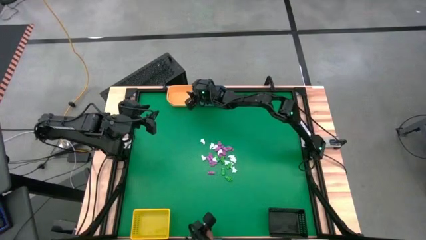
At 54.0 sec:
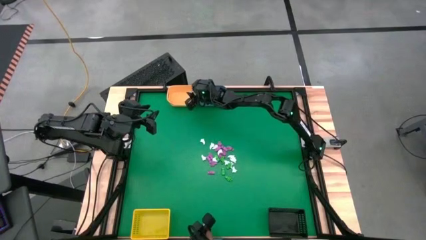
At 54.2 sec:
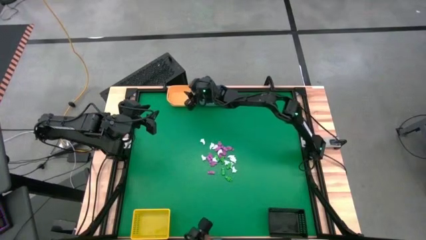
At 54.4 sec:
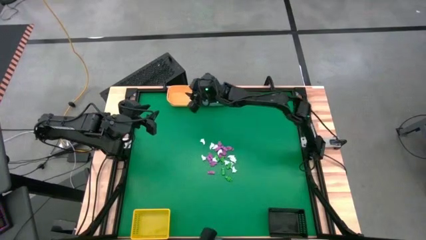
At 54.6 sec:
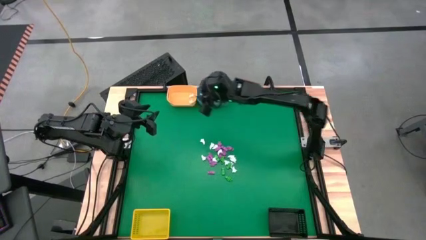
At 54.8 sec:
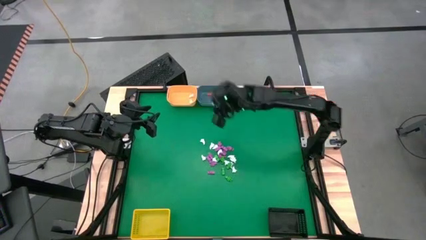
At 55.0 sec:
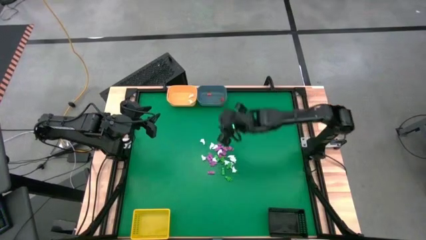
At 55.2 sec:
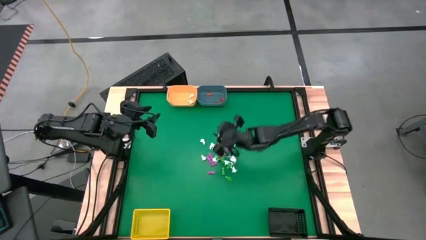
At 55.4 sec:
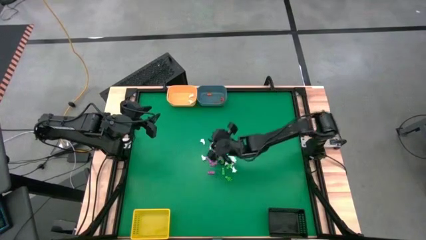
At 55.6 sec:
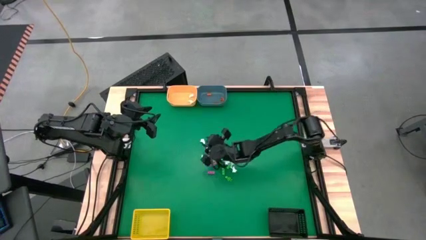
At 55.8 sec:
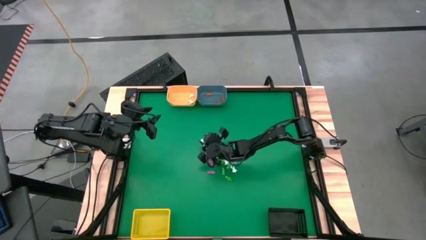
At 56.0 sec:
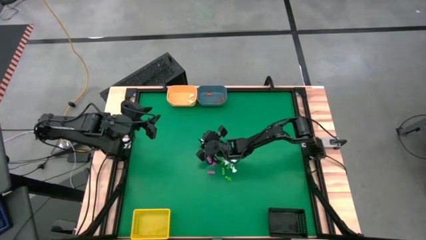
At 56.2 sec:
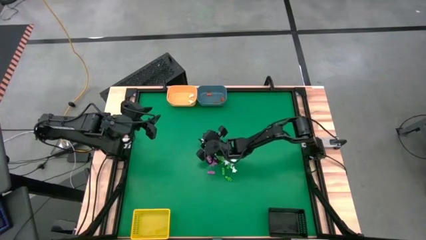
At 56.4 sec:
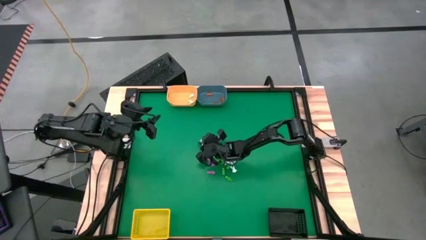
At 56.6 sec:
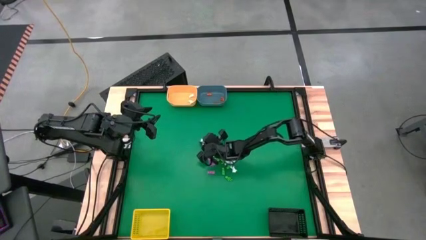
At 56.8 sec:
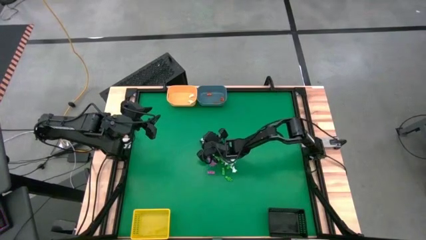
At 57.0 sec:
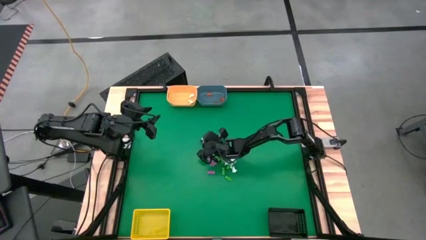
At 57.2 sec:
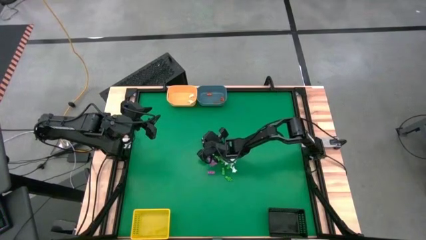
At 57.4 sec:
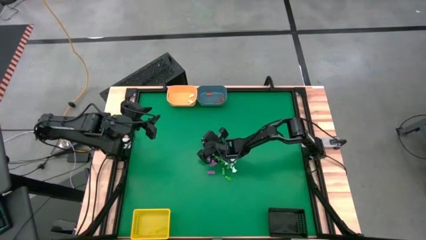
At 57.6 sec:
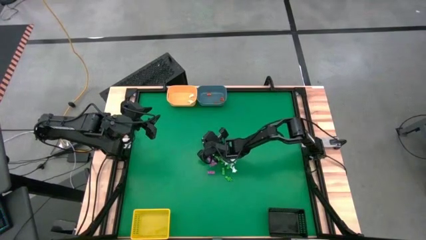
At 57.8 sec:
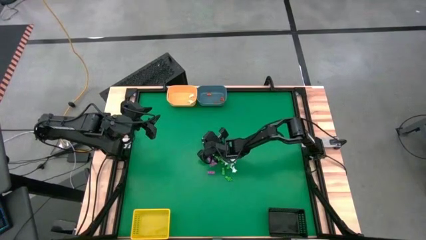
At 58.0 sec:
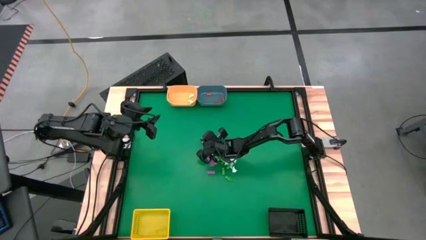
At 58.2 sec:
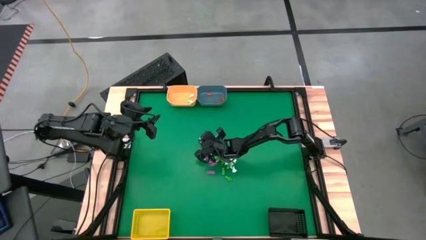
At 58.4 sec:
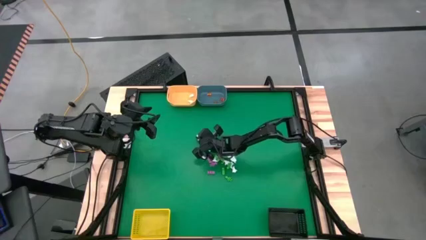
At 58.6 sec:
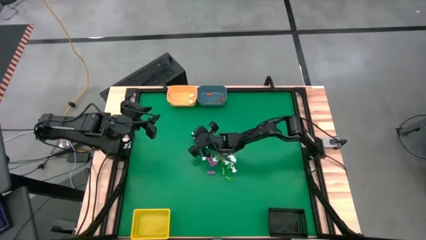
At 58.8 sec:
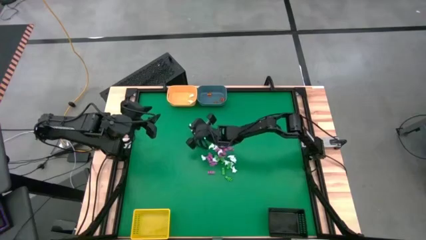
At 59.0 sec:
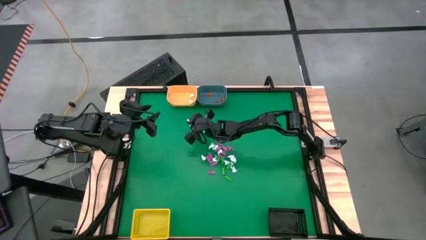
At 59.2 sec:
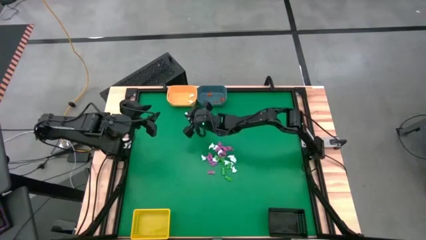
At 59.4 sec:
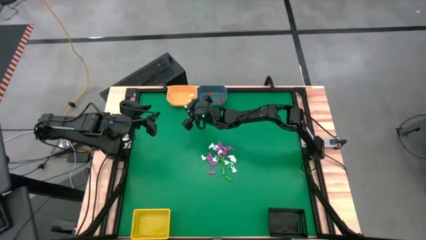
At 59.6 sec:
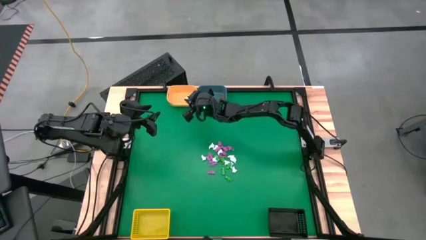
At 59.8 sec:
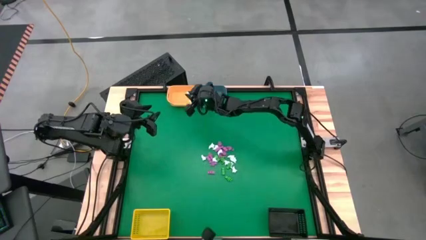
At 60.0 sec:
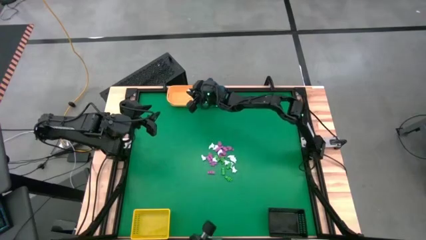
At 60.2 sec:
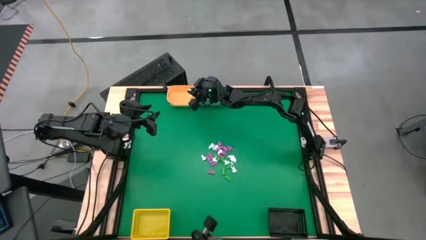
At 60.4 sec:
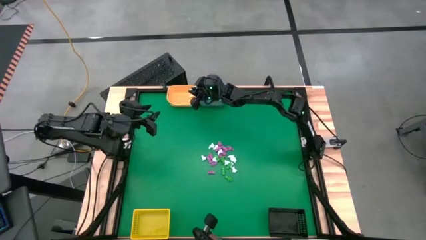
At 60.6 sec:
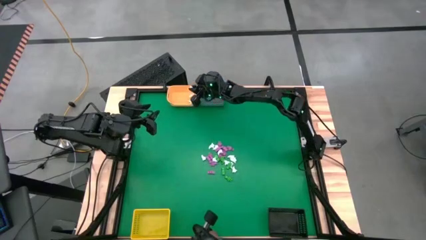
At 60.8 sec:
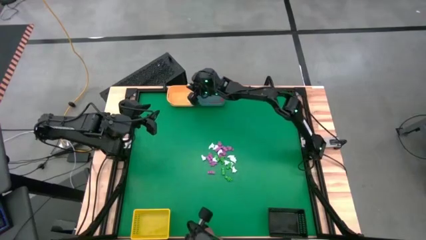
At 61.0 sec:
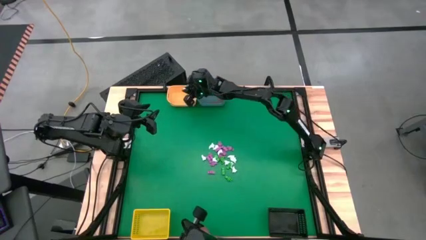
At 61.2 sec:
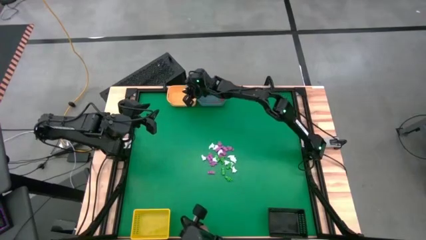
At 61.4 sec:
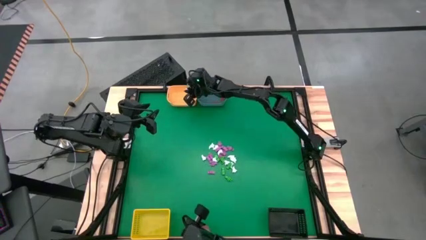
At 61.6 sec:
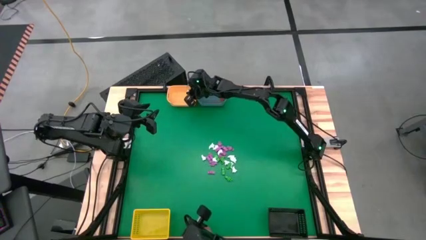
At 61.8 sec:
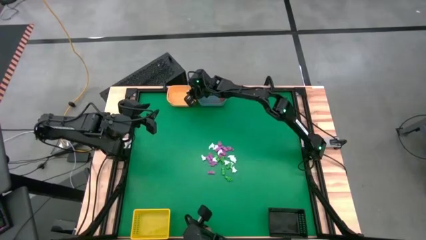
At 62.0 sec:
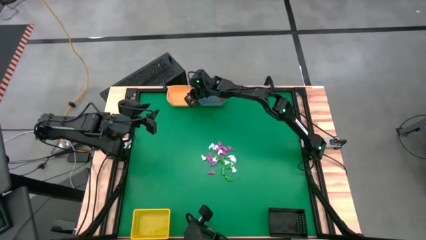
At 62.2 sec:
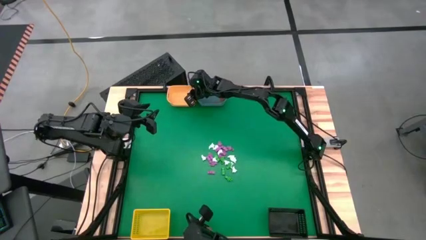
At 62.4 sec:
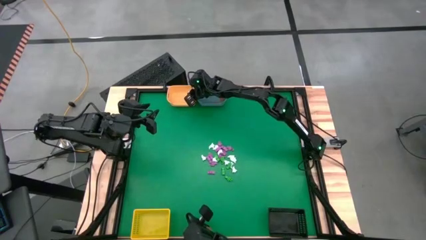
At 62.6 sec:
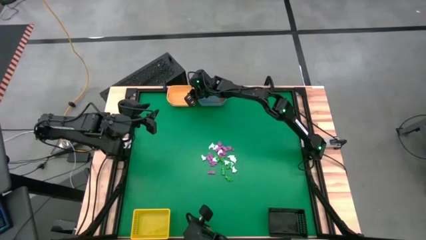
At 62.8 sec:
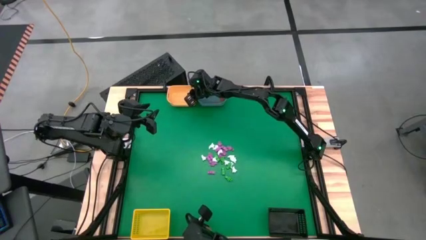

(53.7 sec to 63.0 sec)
Task: Sort Halloween decoration
Put the white ghost into the orange bin

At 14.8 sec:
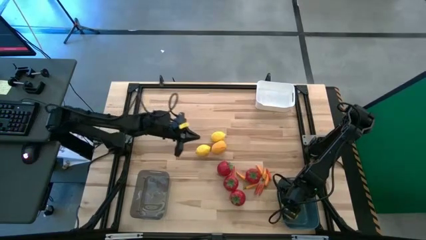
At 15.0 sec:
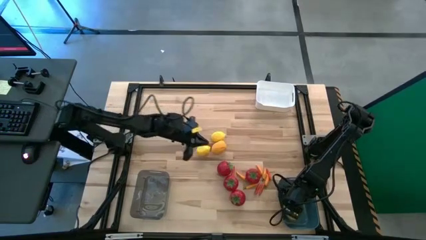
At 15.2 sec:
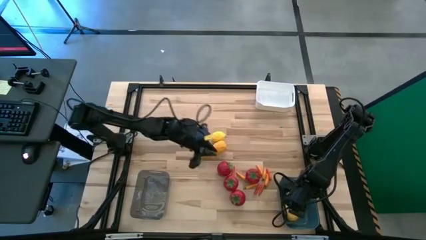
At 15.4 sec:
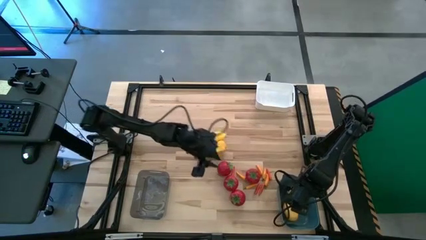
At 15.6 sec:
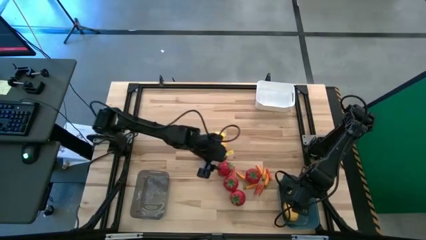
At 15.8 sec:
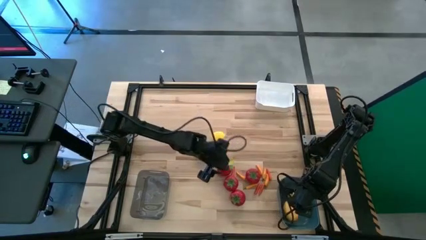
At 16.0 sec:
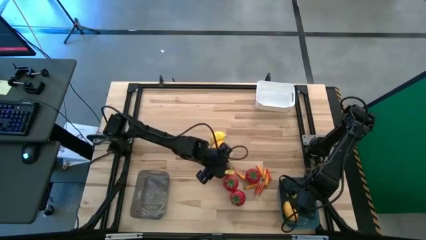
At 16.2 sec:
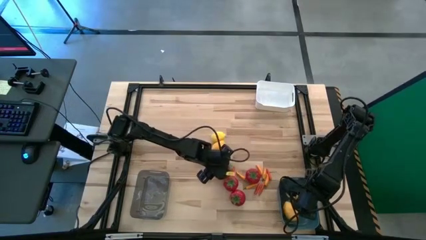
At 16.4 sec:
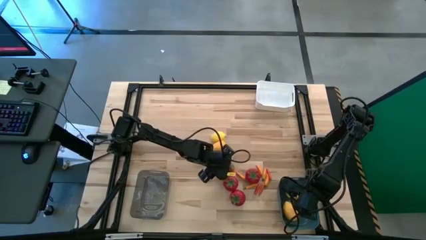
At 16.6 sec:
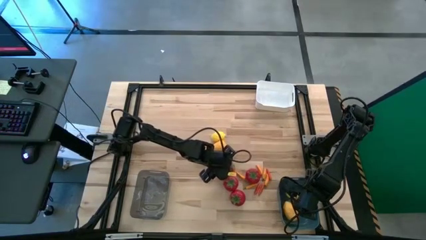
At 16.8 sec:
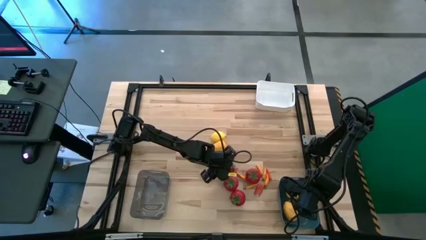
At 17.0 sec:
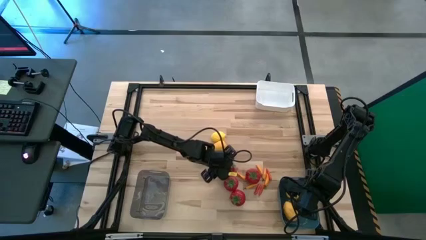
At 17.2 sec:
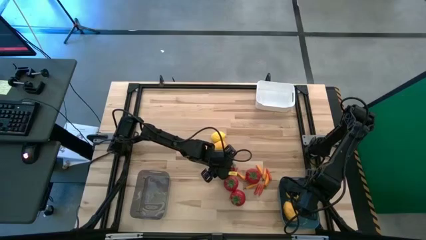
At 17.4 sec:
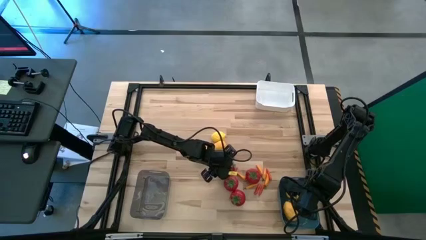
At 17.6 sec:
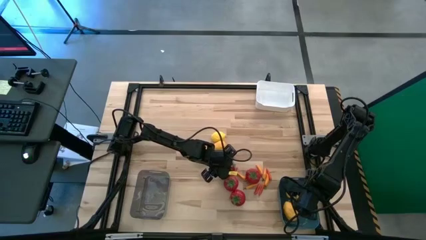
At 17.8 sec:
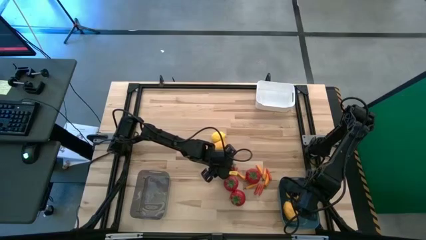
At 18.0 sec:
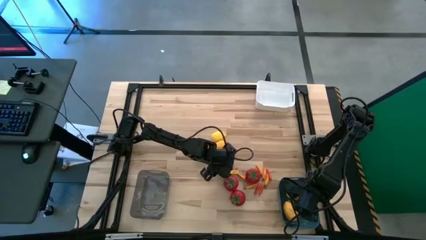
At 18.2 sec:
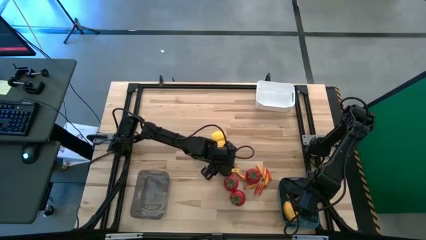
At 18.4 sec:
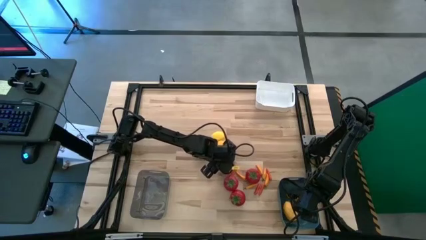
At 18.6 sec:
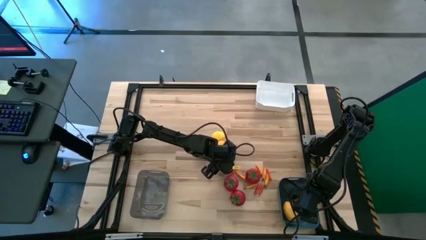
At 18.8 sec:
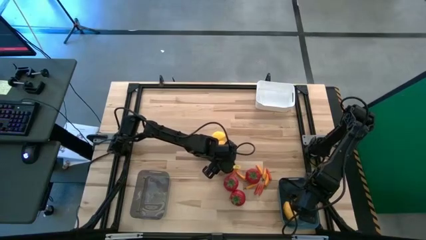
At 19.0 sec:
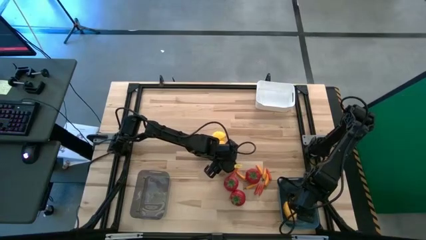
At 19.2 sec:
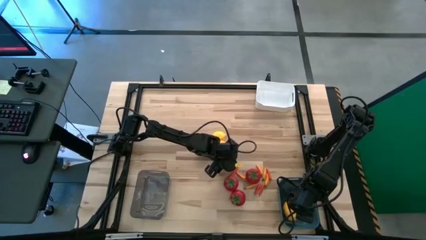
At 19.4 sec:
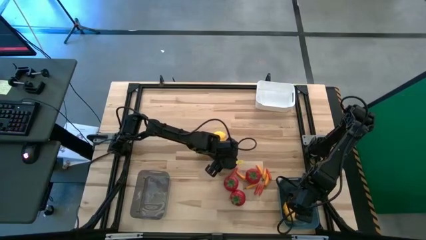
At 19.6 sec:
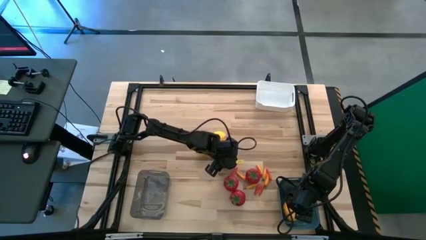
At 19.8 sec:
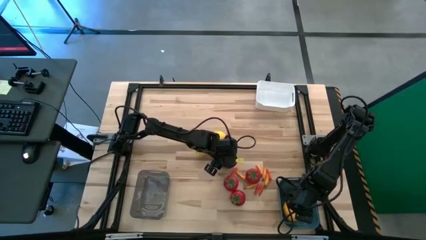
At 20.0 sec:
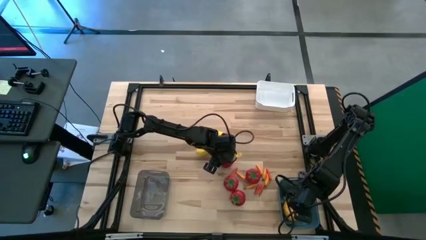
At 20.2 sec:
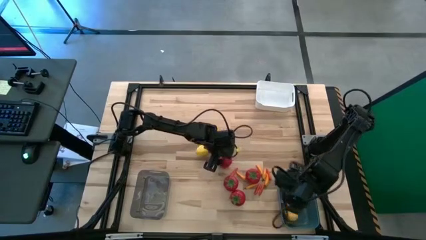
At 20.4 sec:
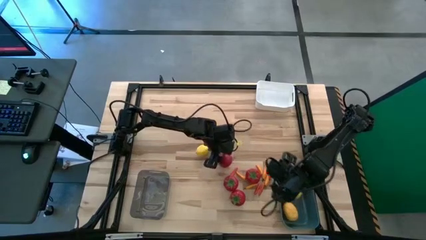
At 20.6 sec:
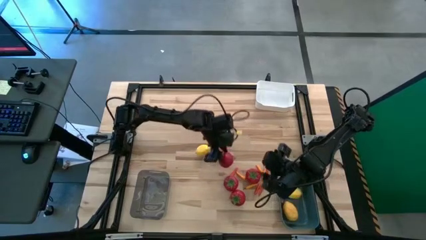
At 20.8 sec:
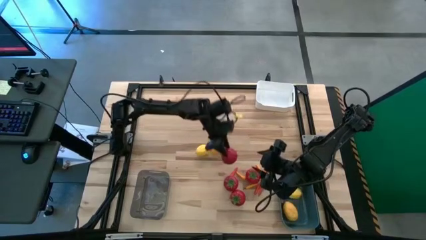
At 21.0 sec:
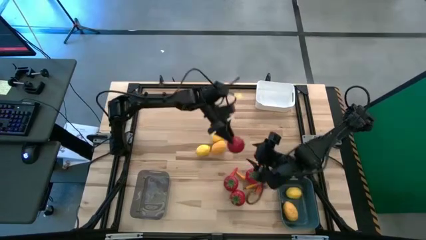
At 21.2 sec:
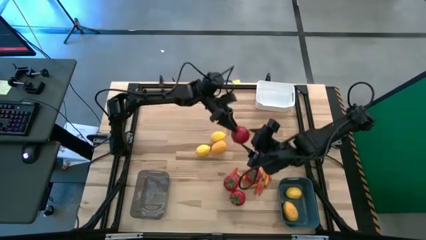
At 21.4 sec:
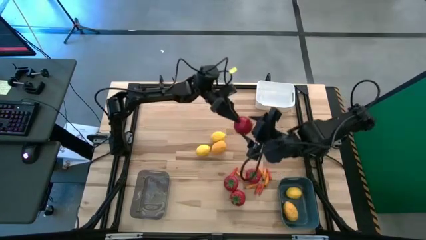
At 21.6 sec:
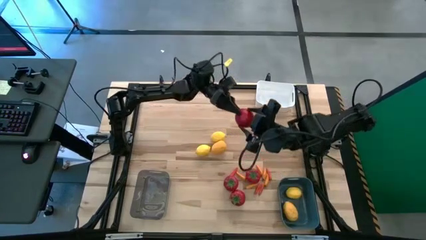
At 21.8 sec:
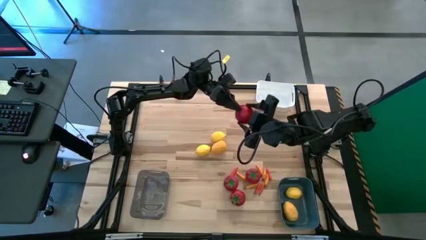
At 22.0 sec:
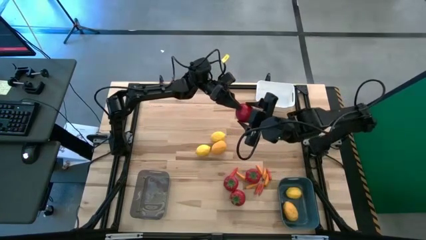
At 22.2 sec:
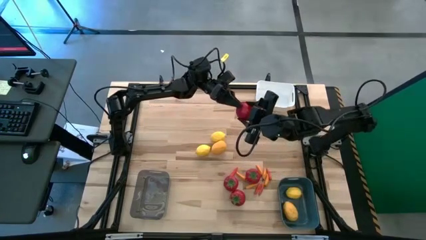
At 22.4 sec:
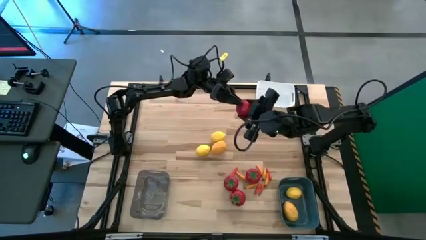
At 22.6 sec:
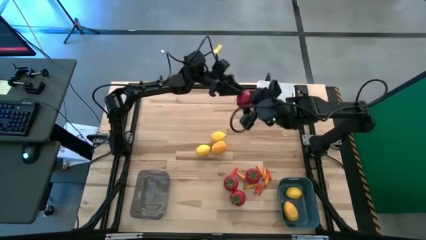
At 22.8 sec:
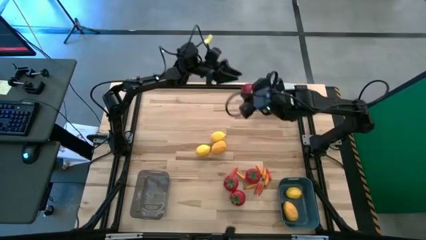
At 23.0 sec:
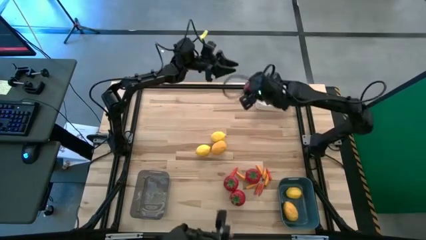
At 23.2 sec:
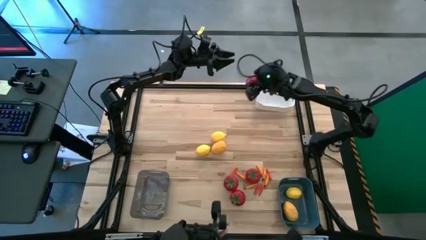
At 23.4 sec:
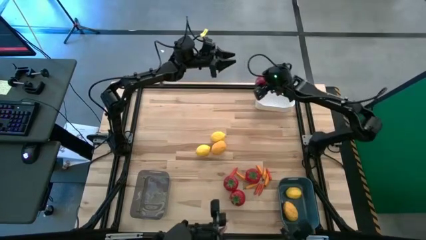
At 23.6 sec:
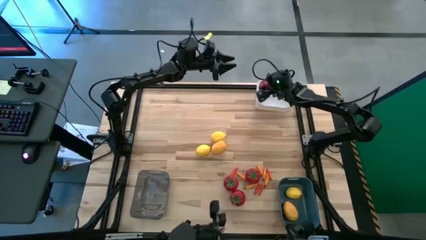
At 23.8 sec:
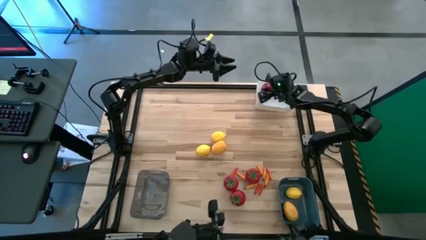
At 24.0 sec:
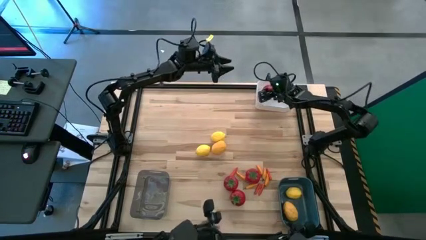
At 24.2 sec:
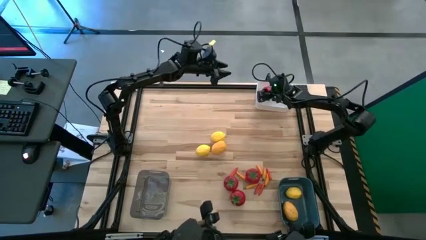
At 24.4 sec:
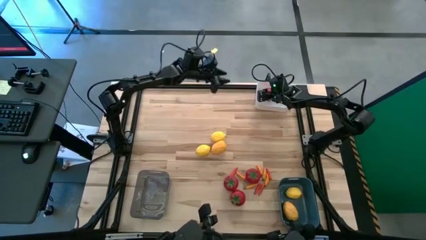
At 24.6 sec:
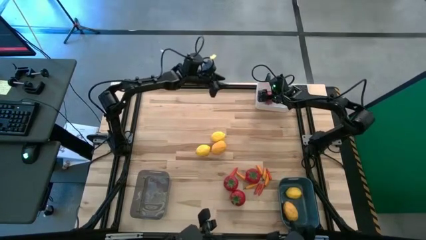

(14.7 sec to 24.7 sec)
Task: Sort produce into baskets
Put the tomato into the white bin
